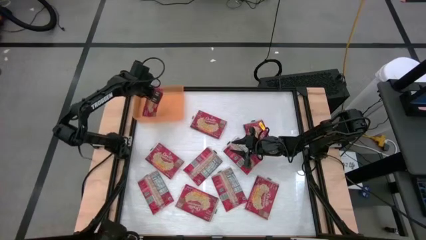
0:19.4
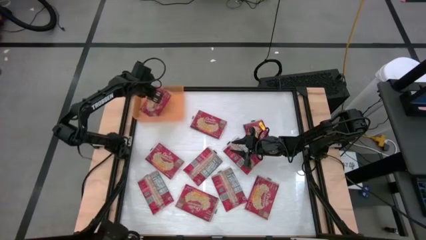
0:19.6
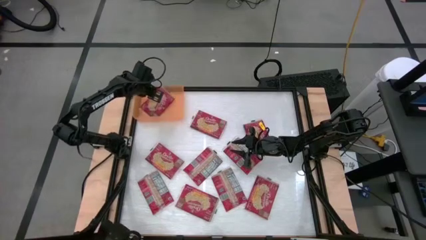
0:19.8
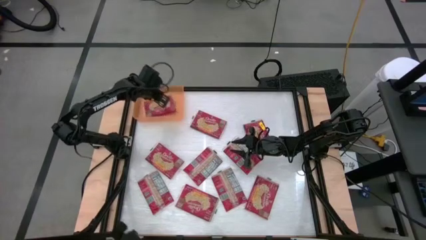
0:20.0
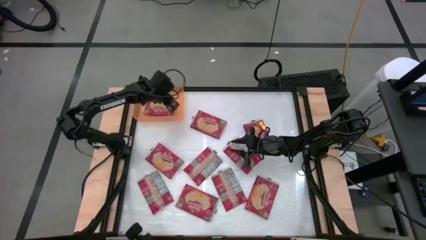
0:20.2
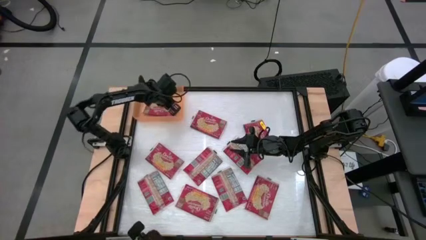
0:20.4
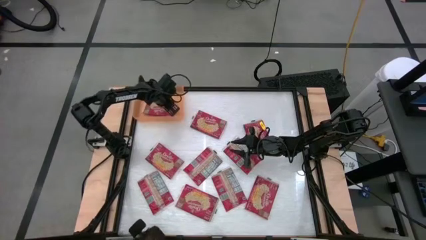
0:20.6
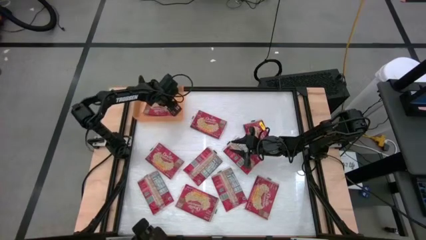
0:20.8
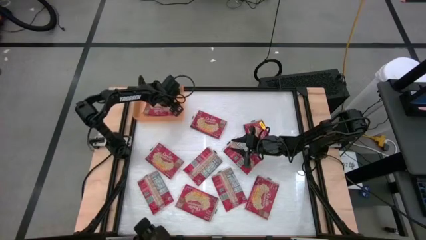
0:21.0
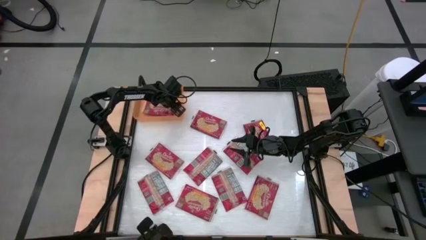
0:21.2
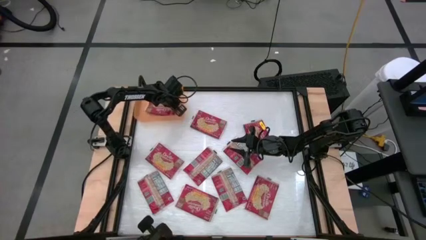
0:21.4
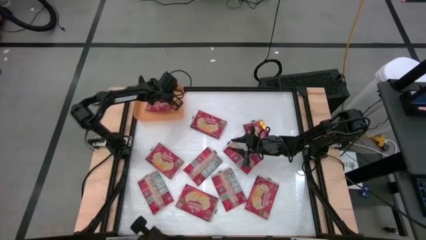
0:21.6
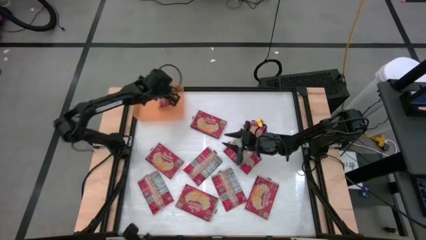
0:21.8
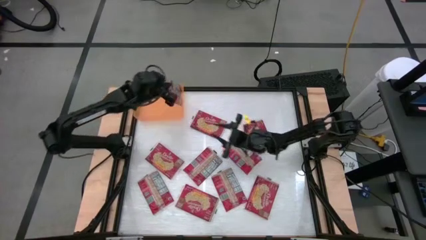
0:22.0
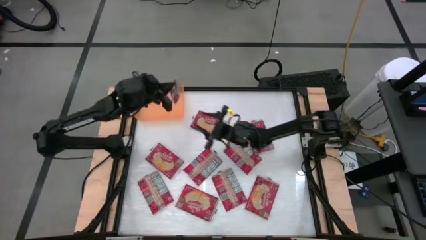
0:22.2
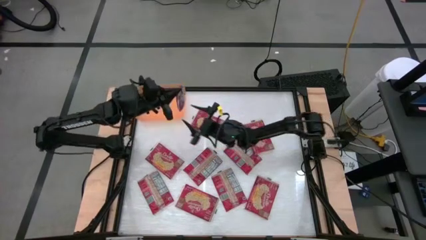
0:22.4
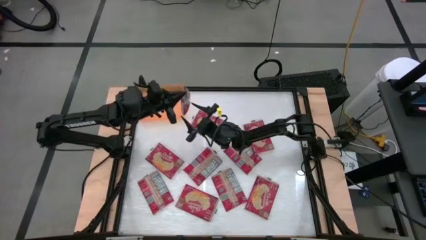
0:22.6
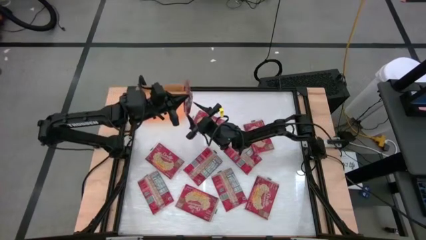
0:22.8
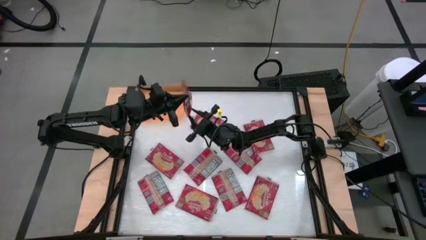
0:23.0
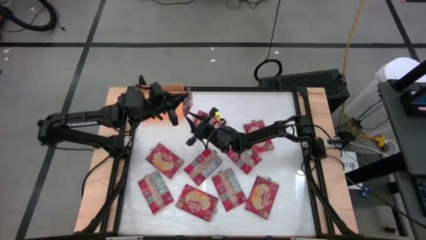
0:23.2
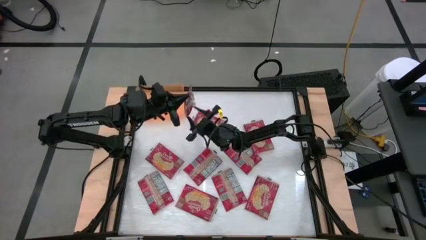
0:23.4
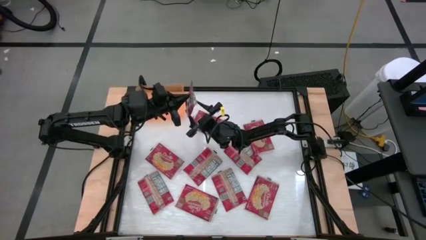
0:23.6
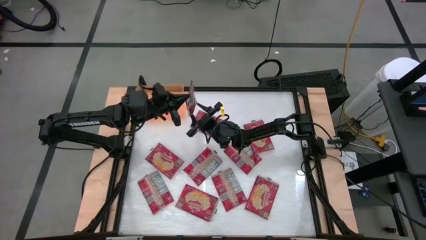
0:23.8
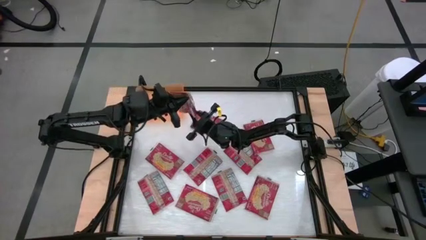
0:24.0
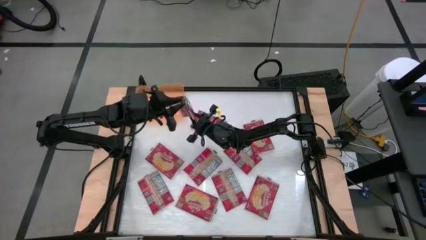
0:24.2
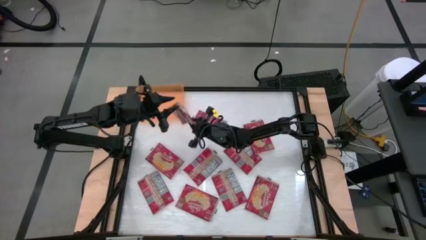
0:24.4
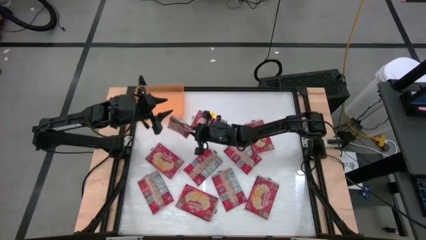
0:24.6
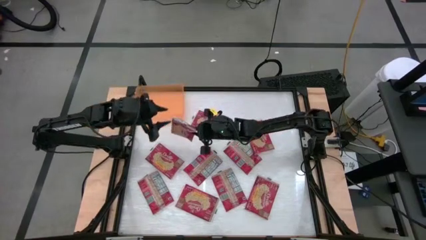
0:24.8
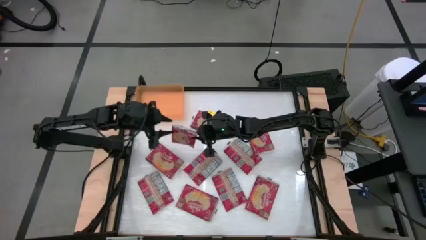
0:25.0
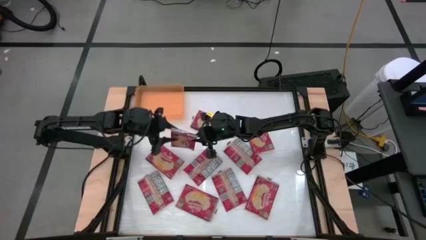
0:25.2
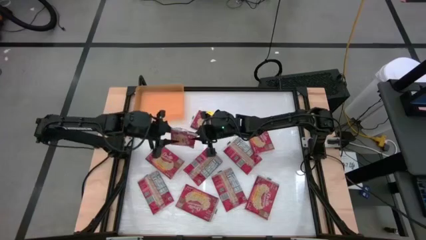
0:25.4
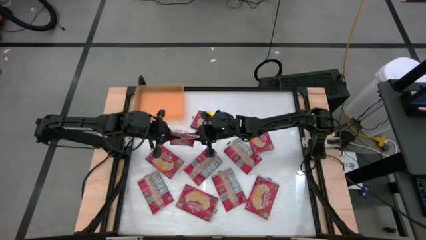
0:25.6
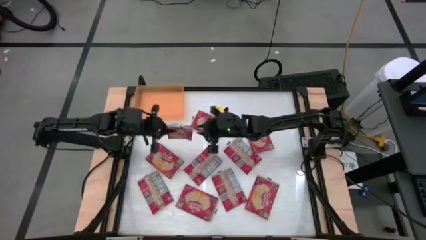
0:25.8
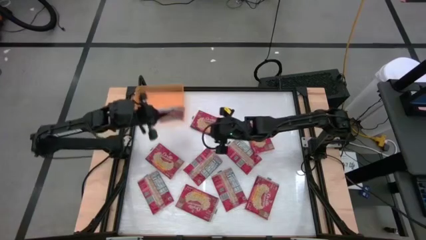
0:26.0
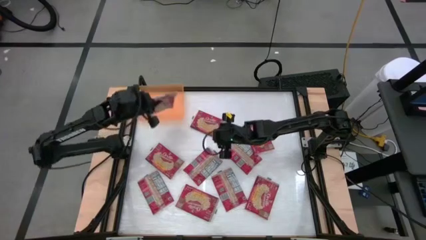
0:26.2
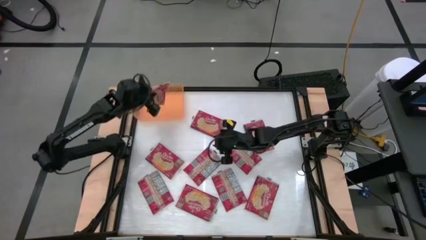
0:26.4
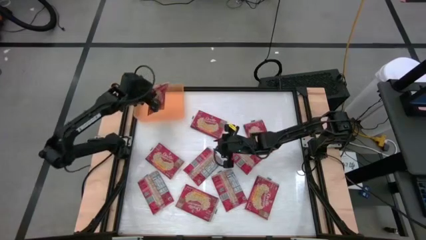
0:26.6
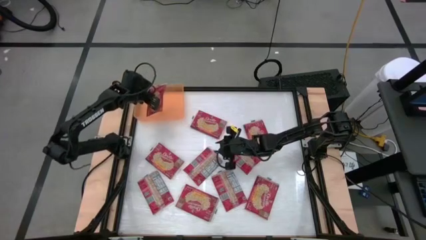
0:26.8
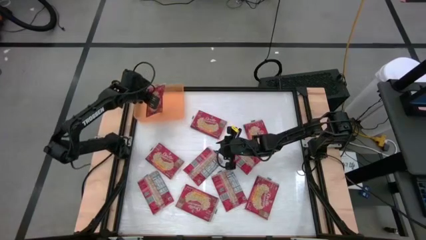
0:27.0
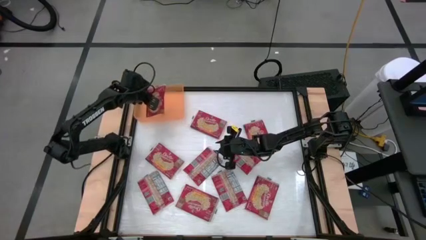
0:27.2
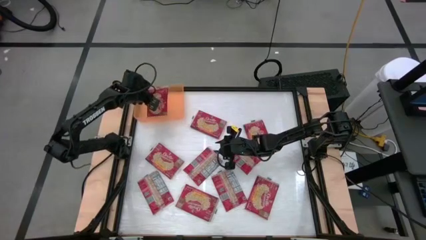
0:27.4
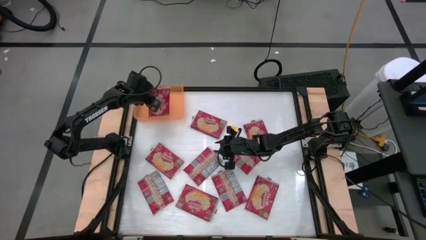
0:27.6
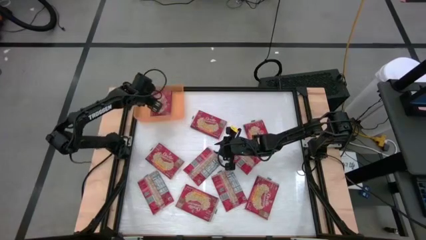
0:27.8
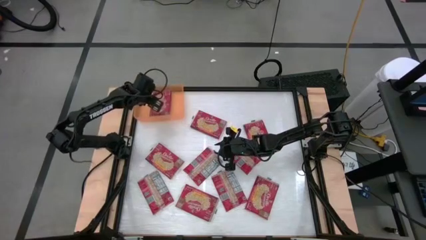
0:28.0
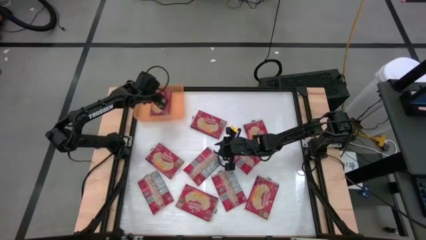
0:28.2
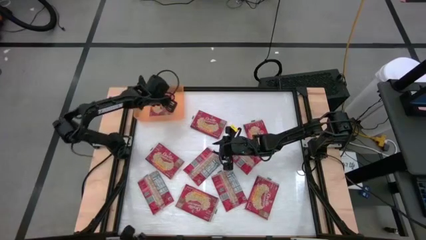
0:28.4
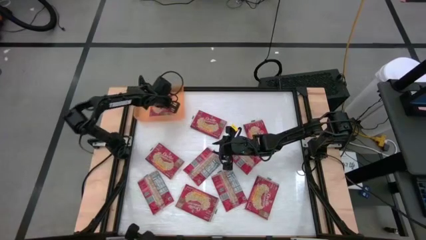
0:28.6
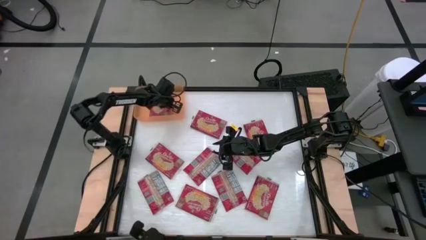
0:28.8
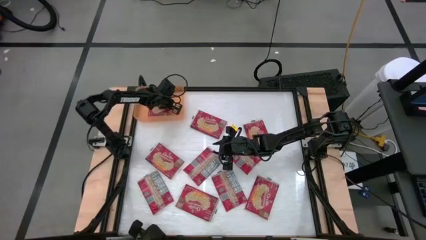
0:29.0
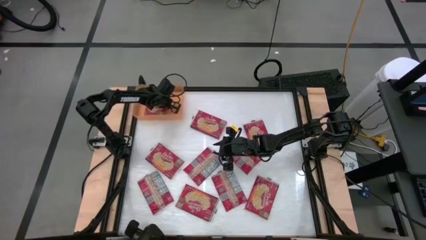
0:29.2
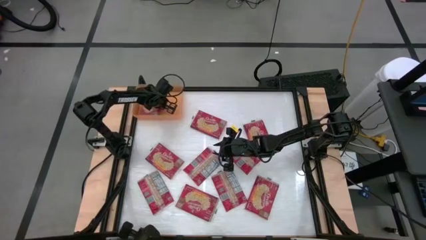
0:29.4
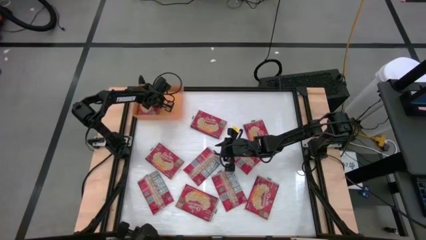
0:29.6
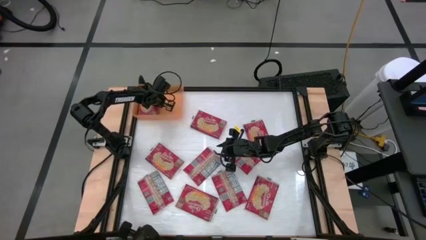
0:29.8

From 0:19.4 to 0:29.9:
Task: Sort popcorn bags into baskets
Put the red popcorn bag into the orange bin
